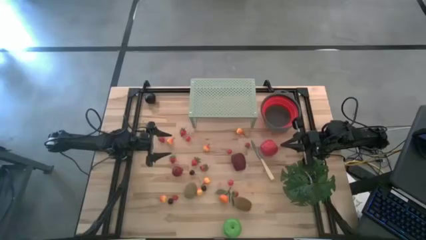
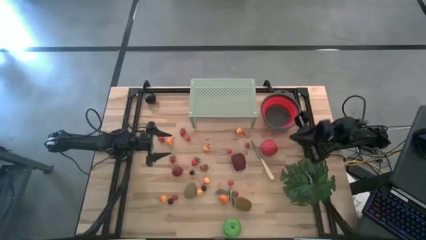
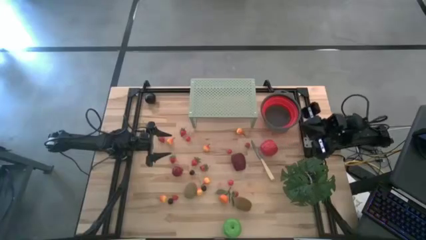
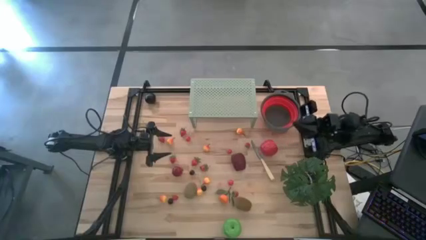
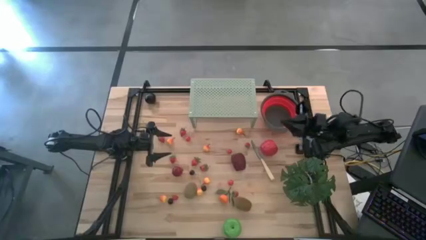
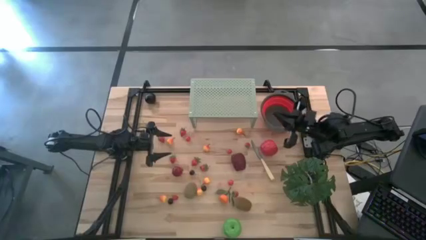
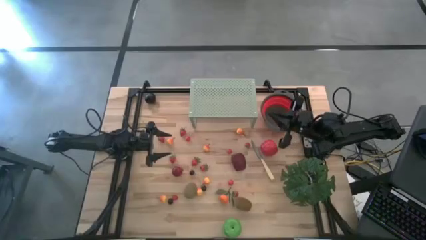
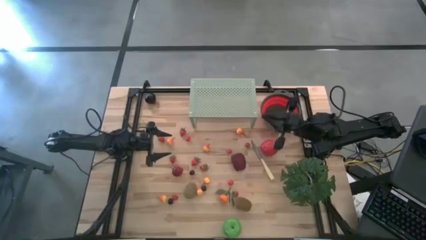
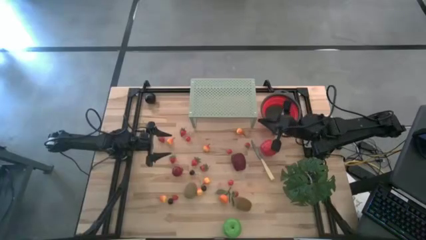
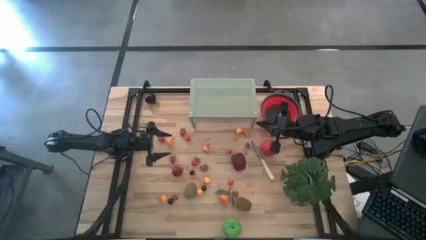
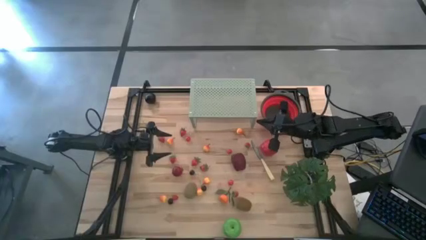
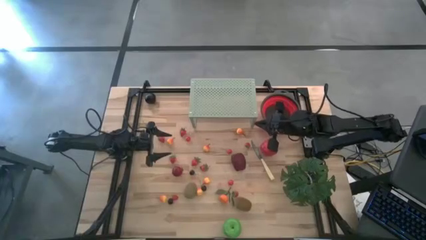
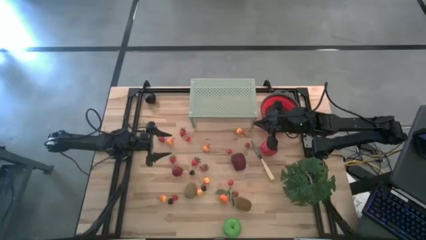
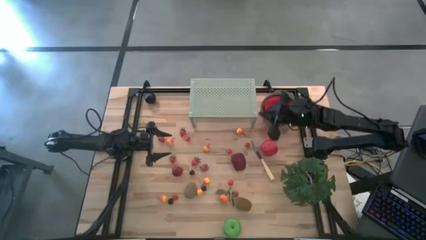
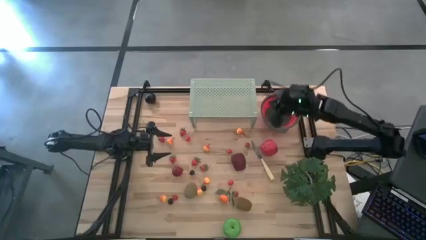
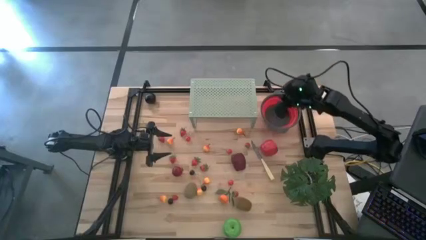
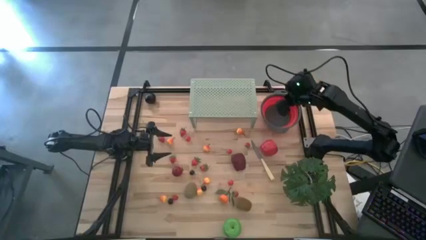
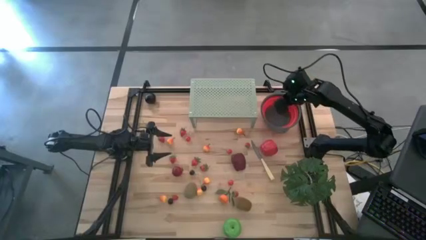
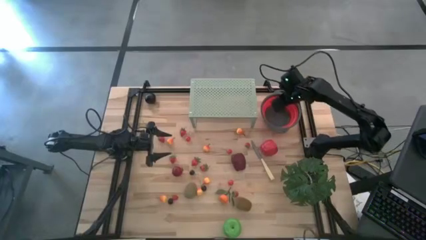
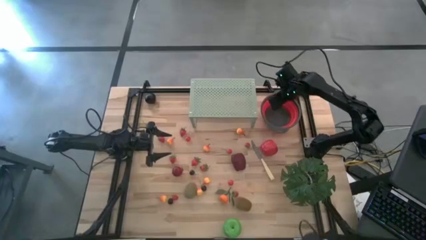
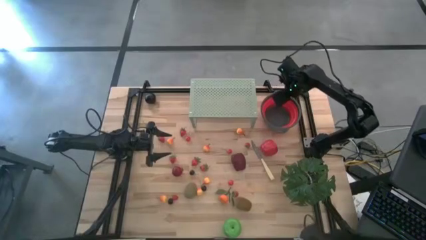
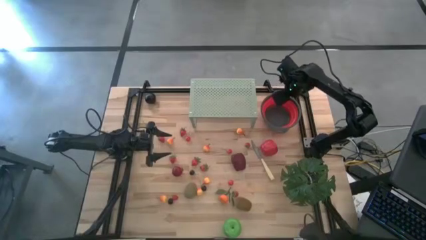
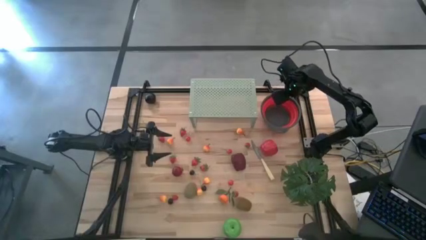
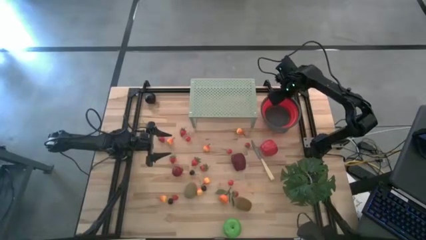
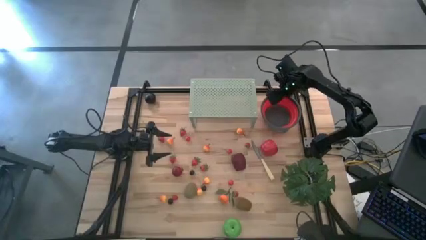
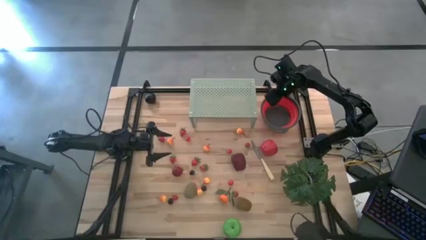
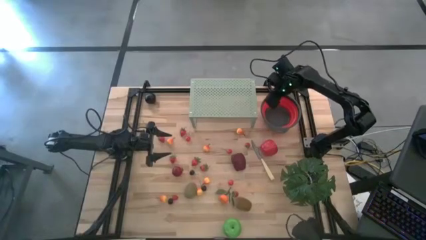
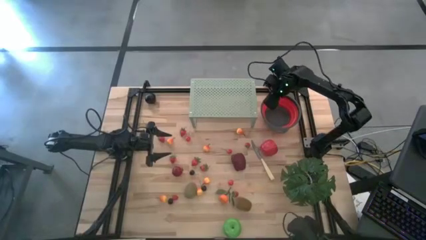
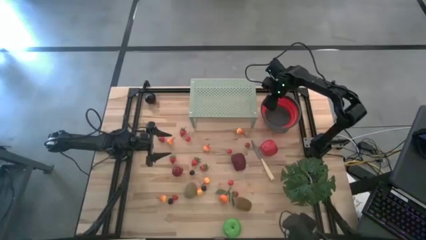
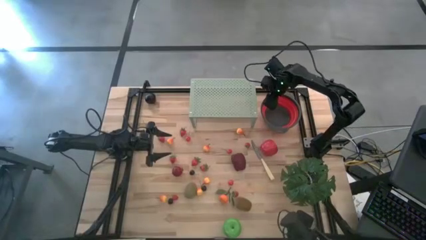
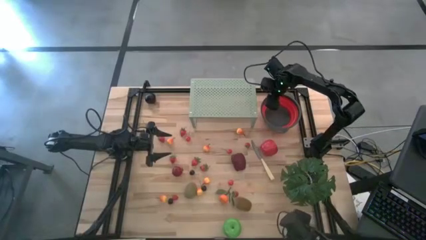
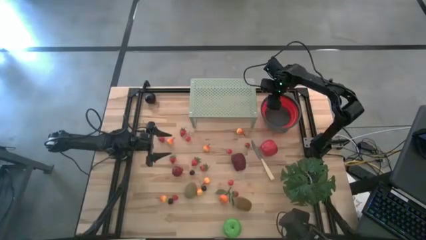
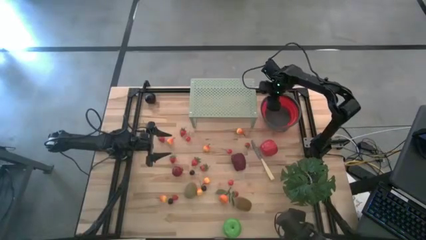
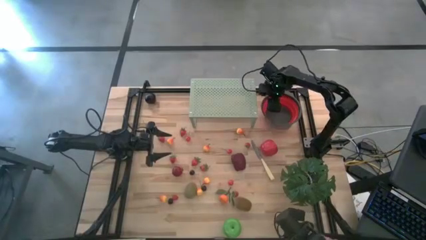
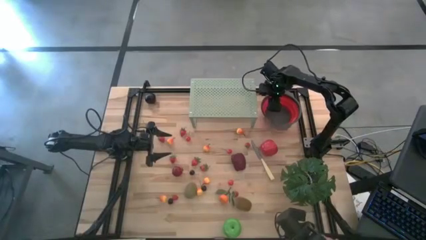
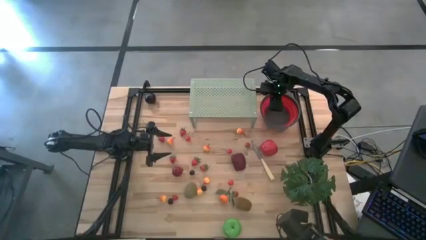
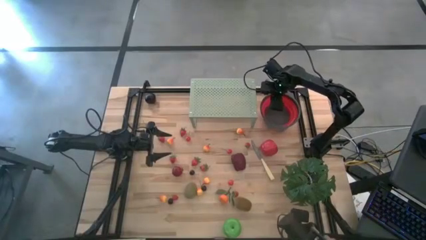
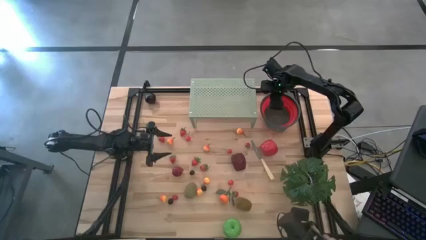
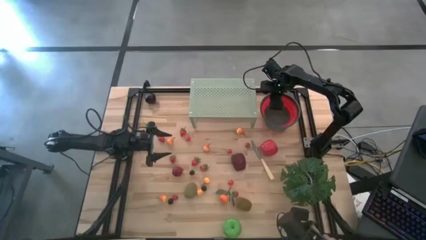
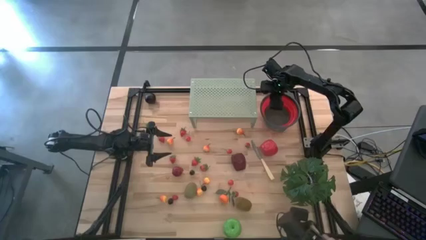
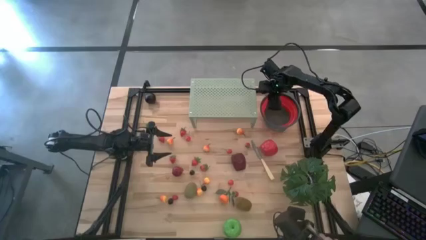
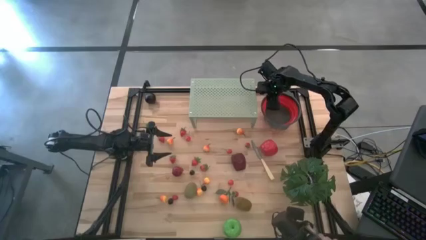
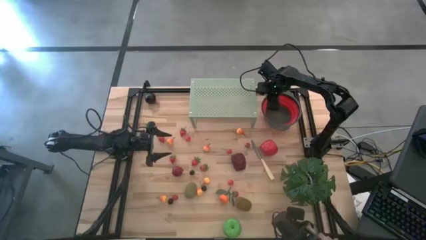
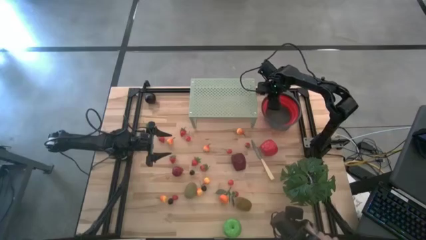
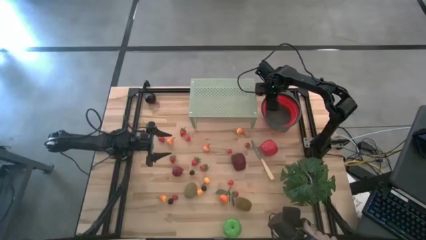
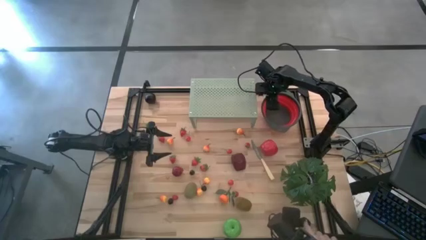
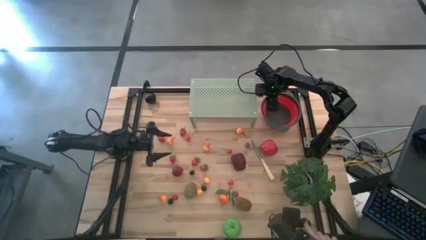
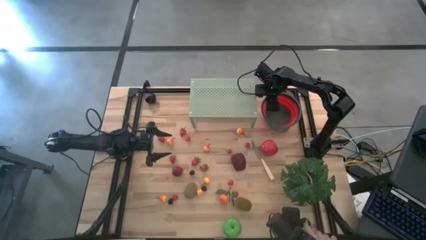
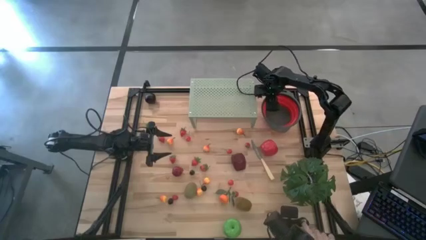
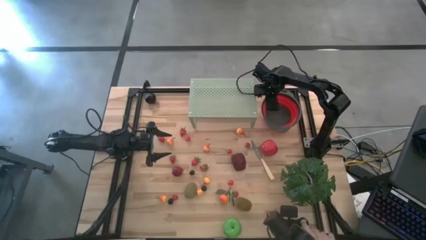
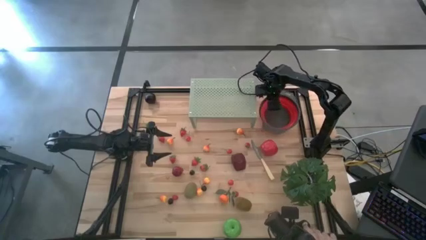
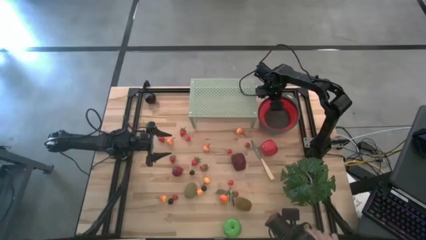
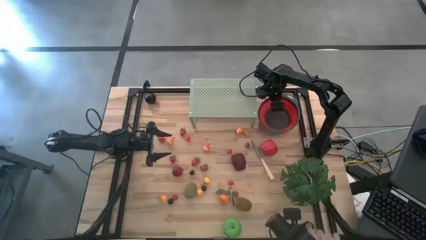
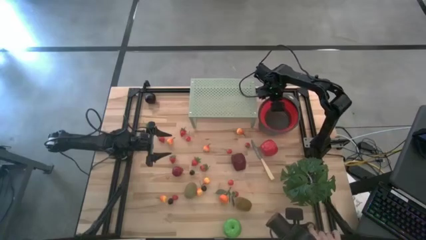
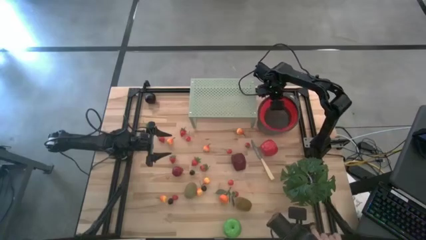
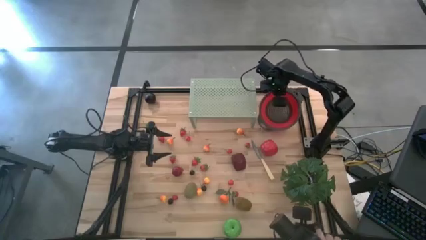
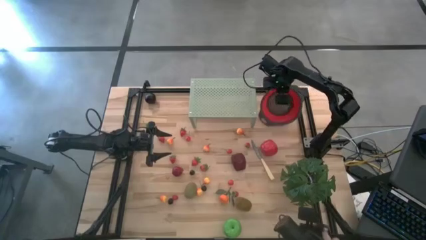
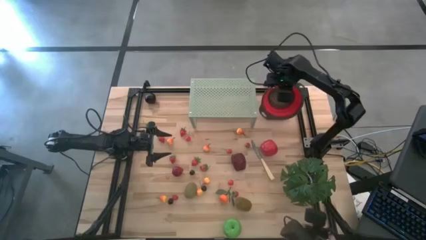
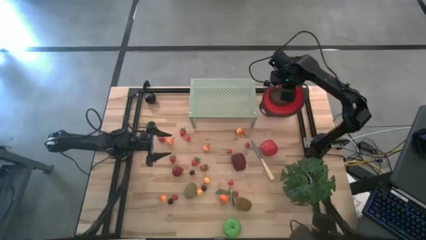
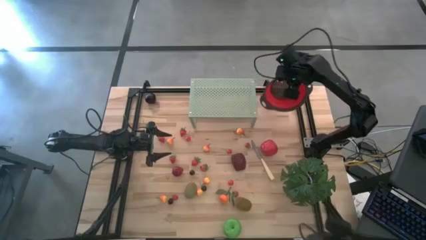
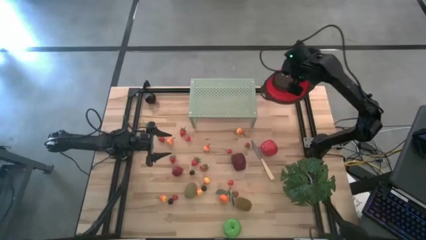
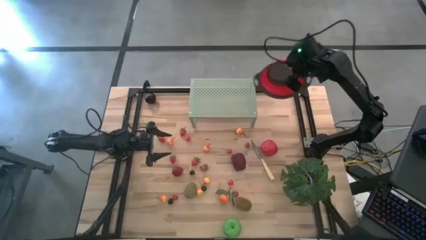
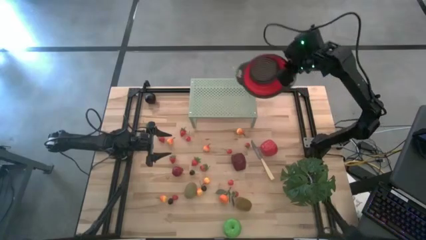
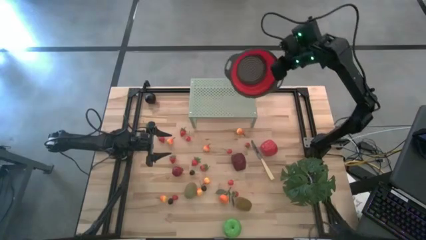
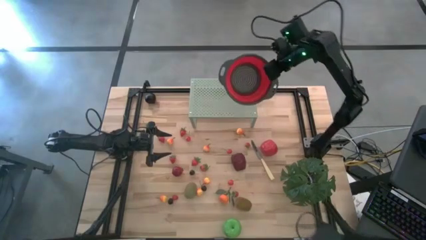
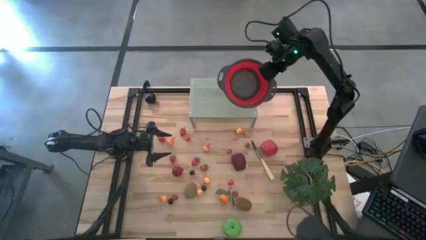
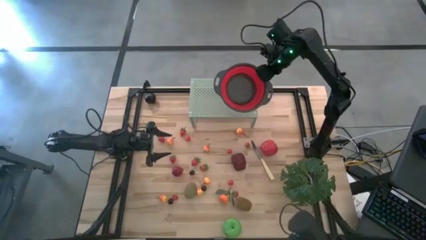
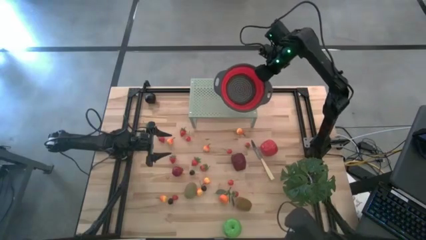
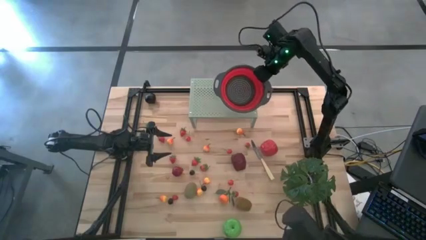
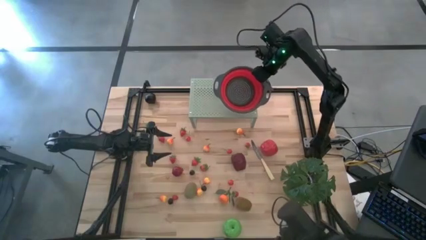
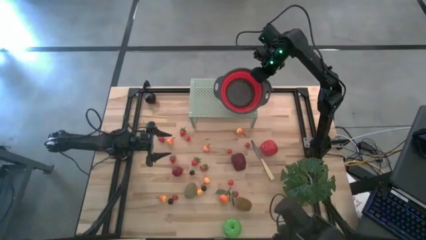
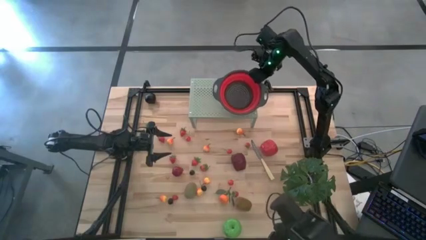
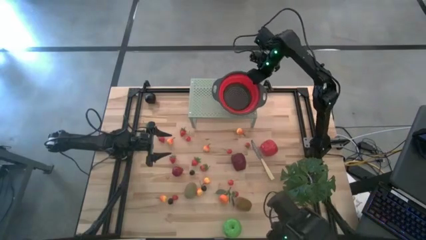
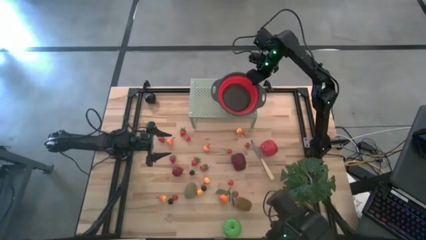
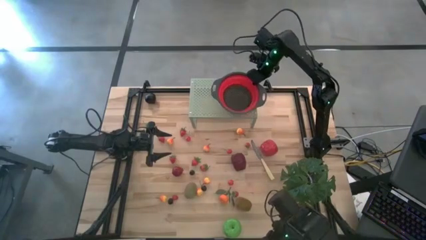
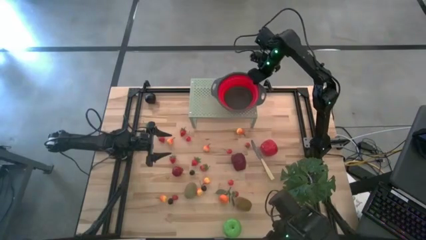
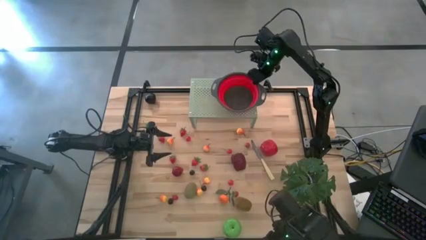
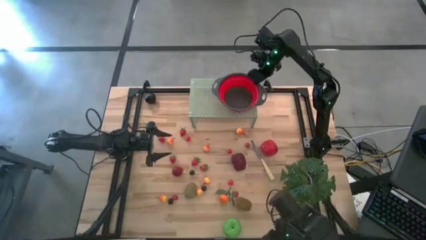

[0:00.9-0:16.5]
Task: Pick & Place Fruit
Put the black strainer bowl on the shelf
